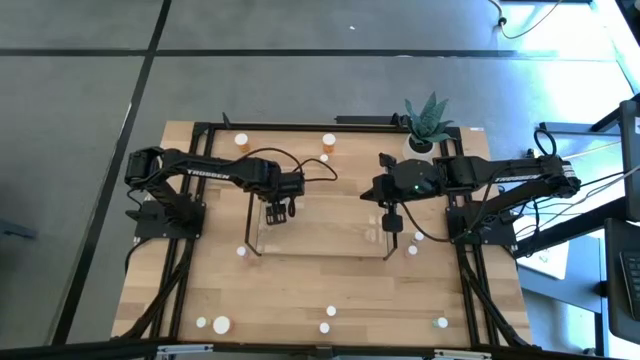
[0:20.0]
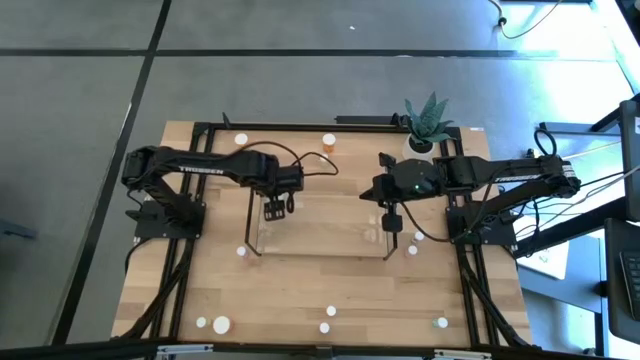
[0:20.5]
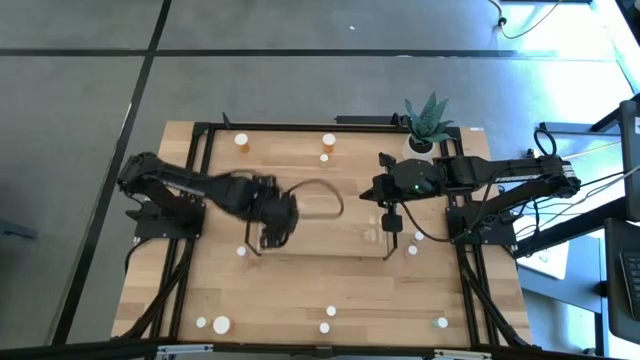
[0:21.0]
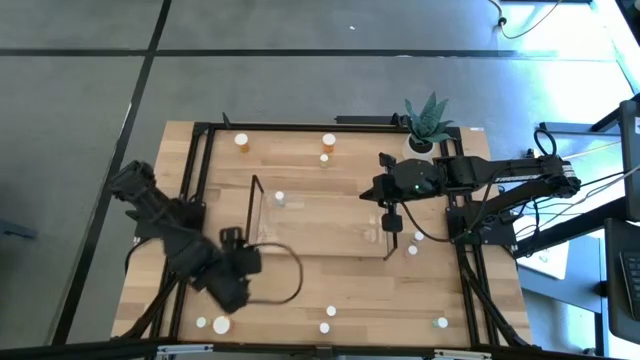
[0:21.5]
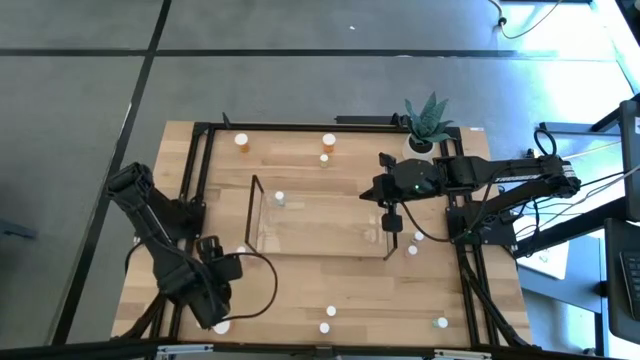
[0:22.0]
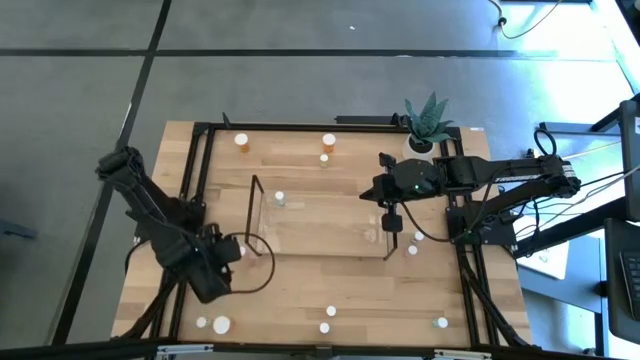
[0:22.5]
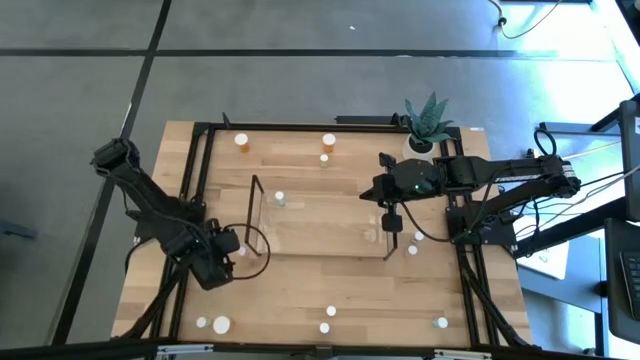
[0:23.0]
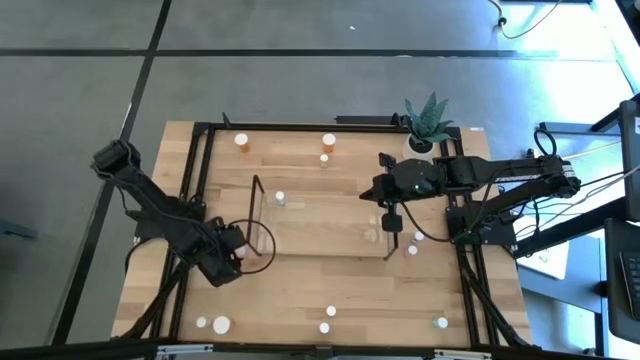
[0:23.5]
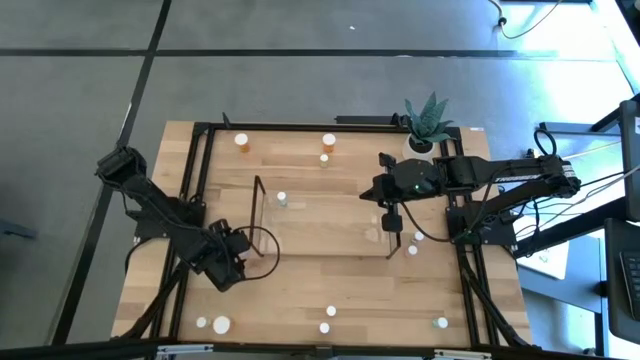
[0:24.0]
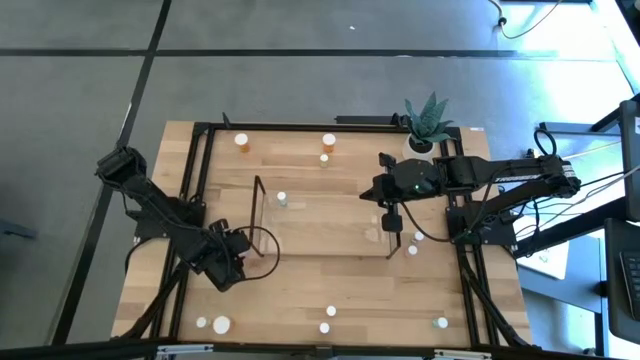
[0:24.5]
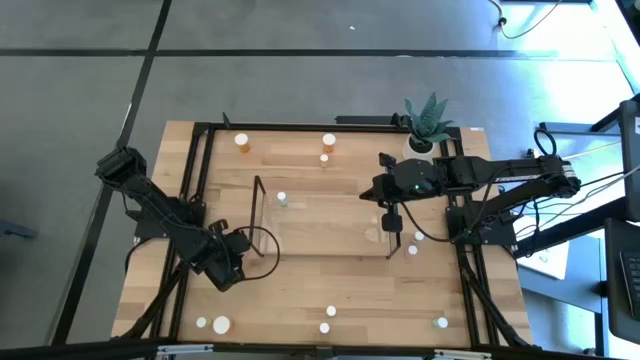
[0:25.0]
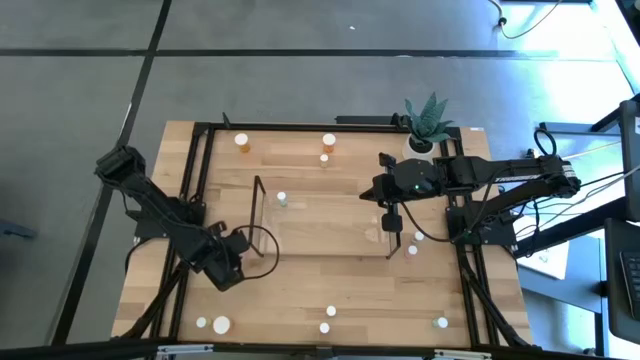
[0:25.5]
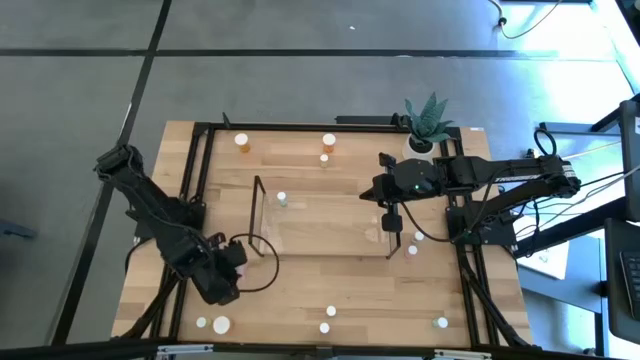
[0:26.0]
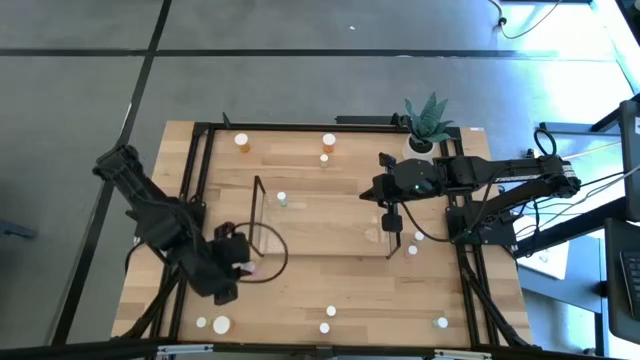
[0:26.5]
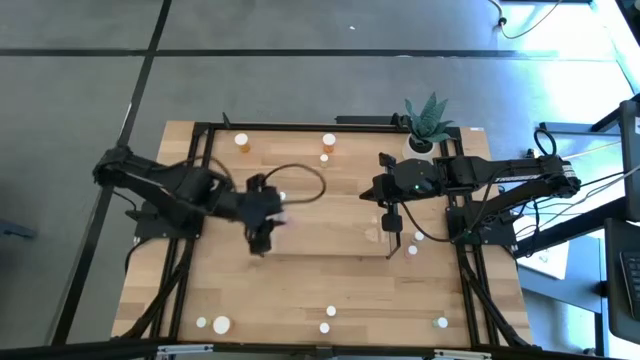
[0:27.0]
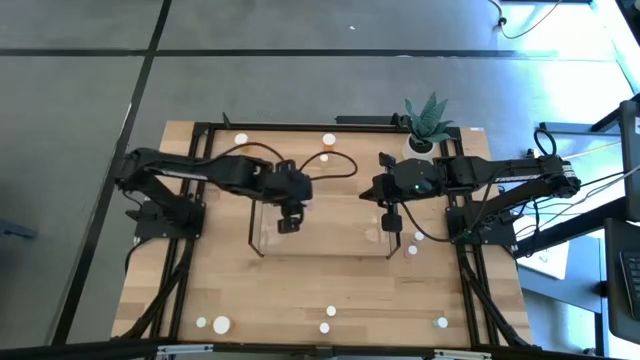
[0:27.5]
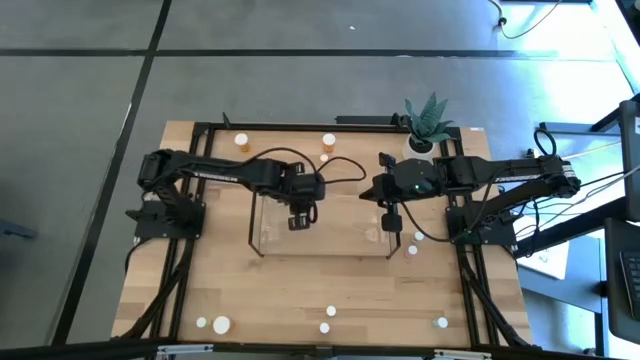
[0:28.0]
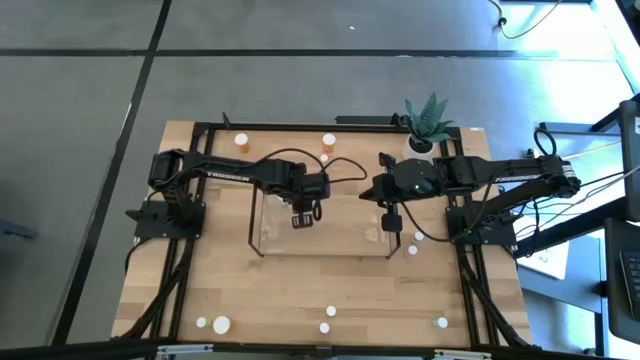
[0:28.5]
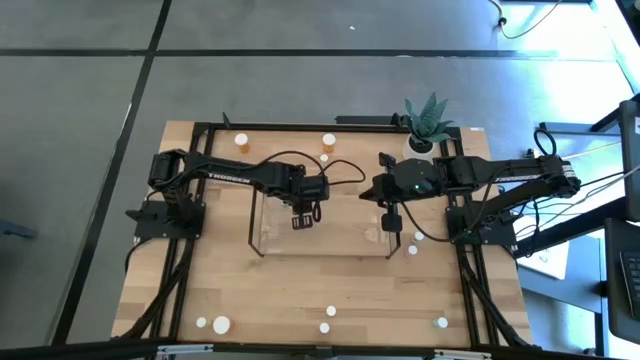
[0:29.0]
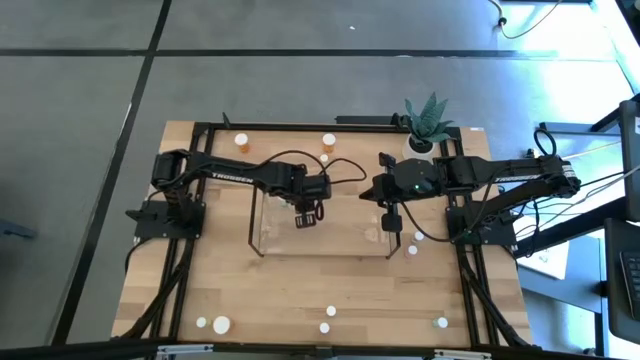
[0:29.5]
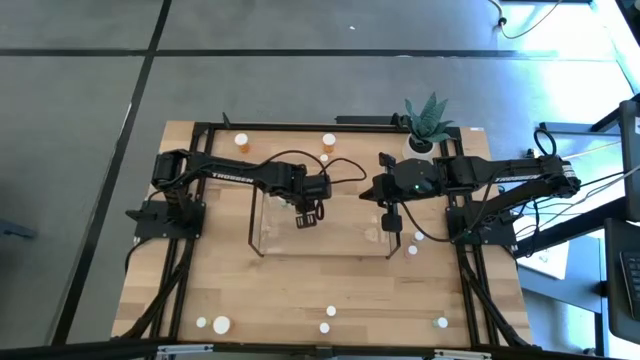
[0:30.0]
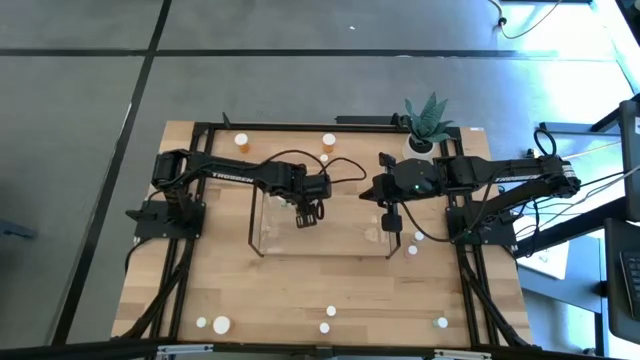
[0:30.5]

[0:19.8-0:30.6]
Task: Pick and place medicine bottles onto shelf by color
Put the top left pink pill bottle on the shelf

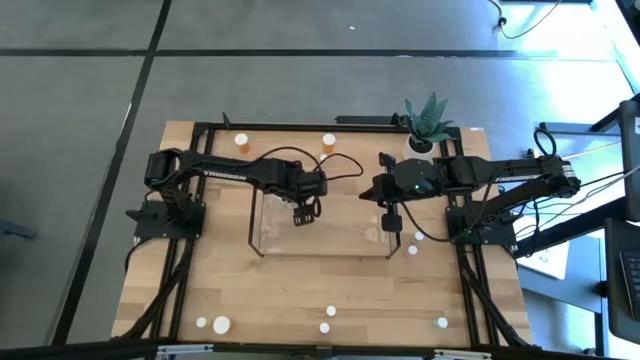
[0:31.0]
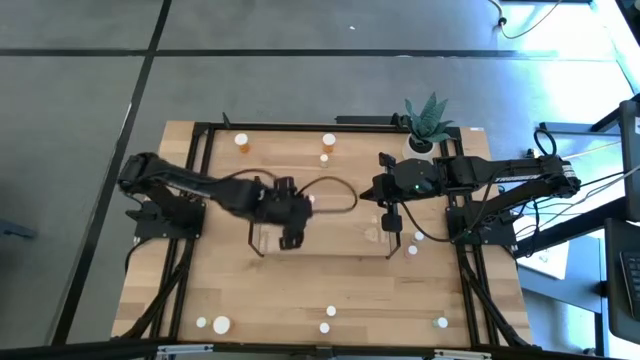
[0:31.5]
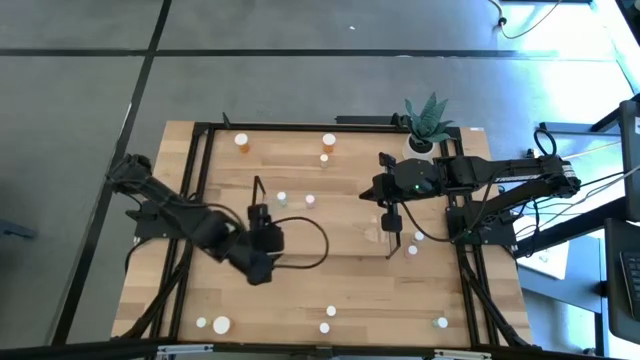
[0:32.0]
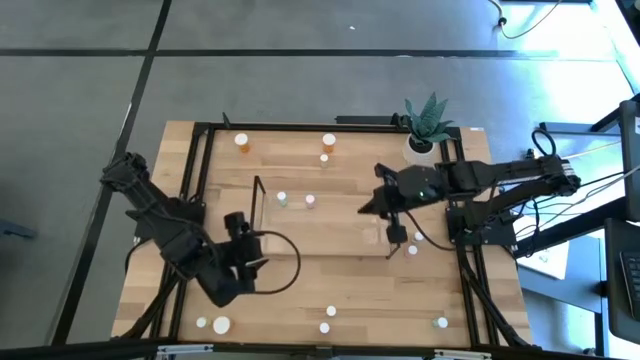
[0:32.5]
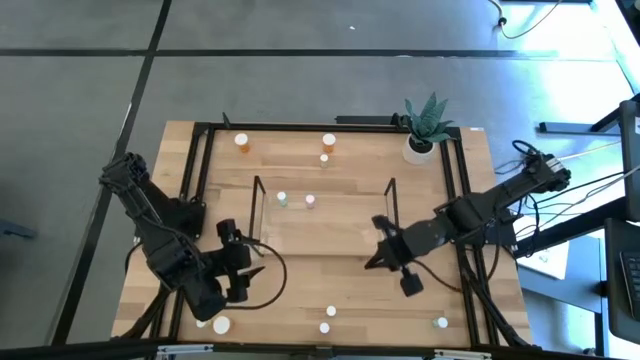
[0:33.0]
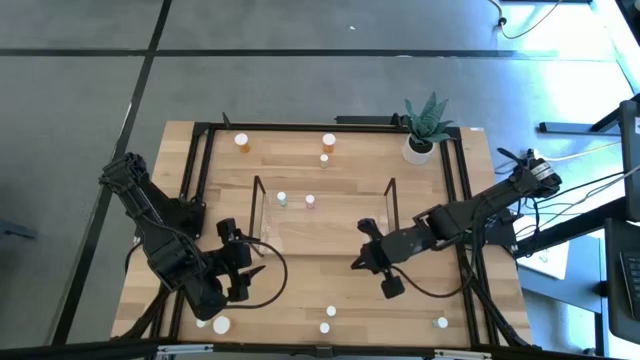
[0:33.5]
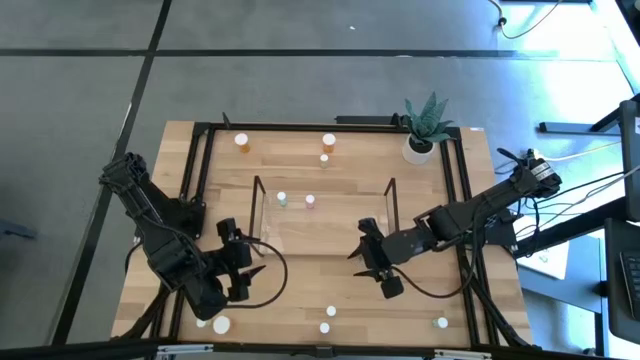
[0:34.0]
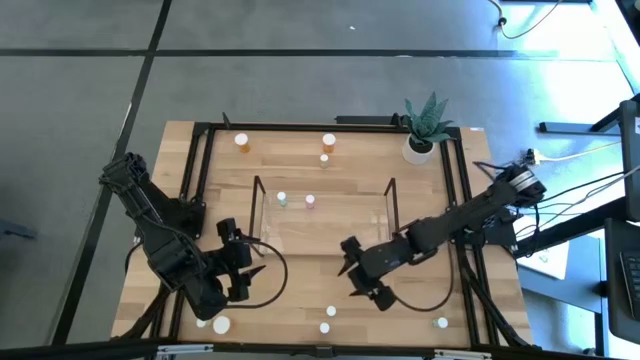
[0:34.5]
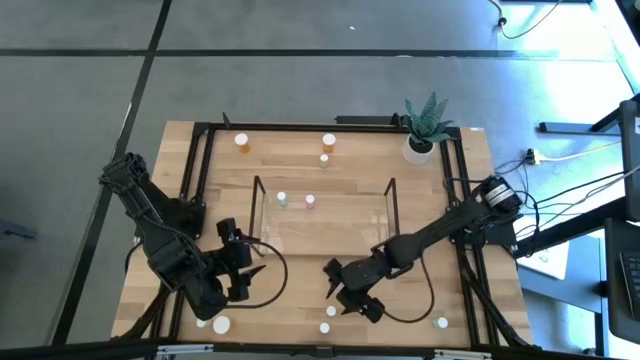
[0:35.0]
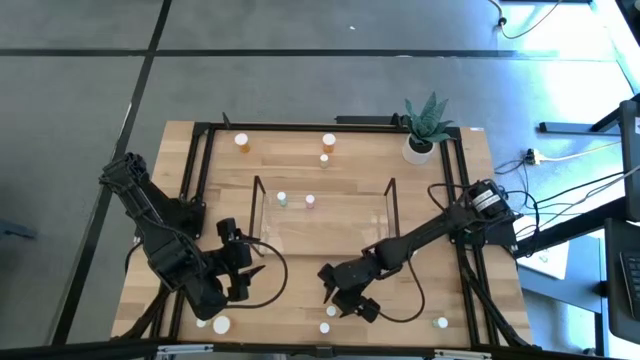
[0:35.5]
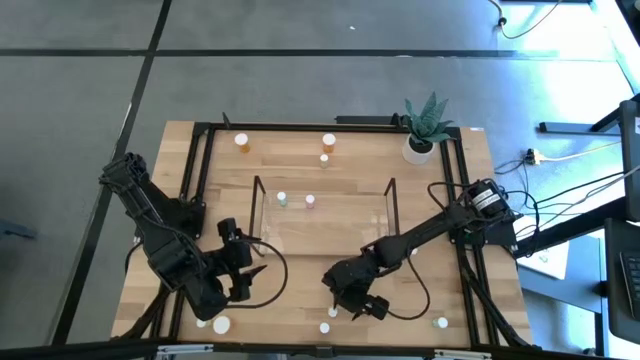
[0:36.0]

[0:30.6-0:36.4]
Put the bottom right yellow pill bottle on the shelf

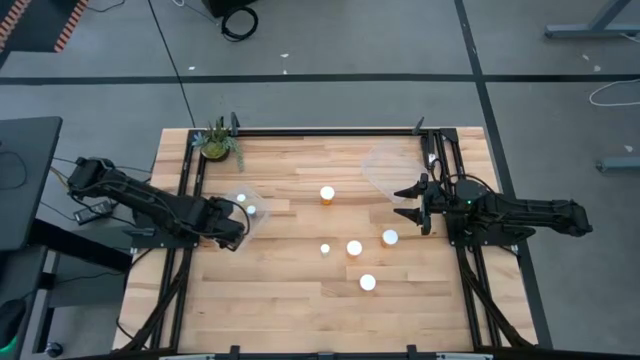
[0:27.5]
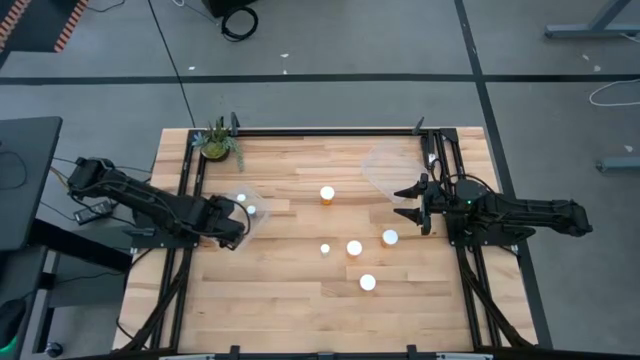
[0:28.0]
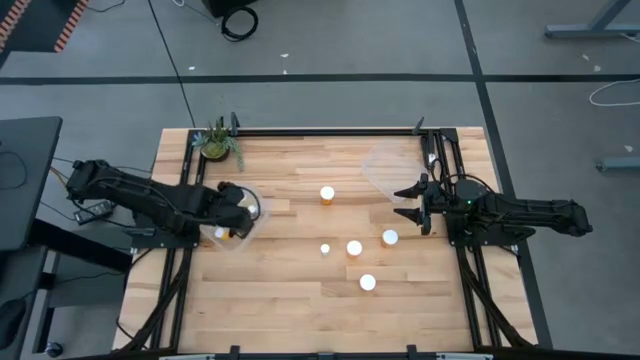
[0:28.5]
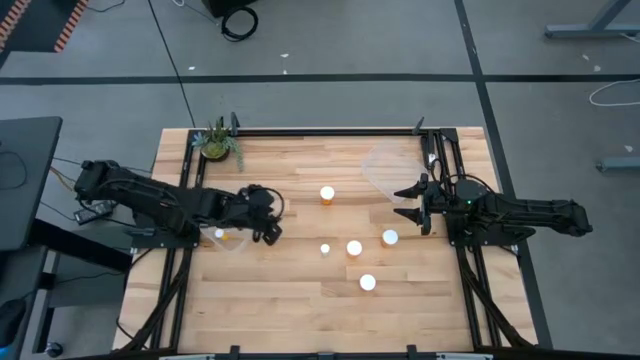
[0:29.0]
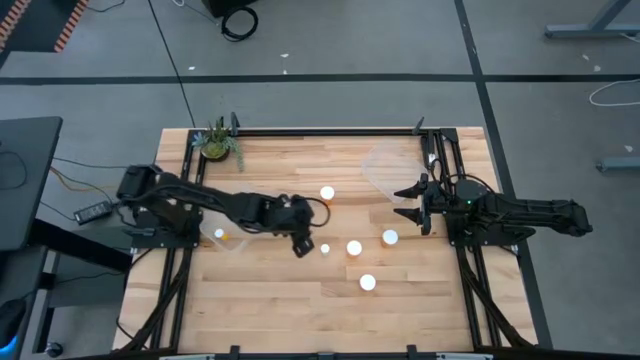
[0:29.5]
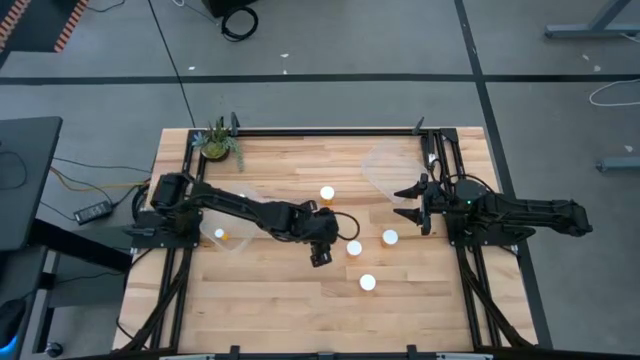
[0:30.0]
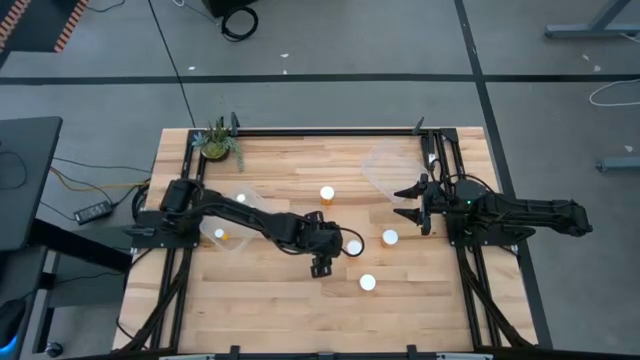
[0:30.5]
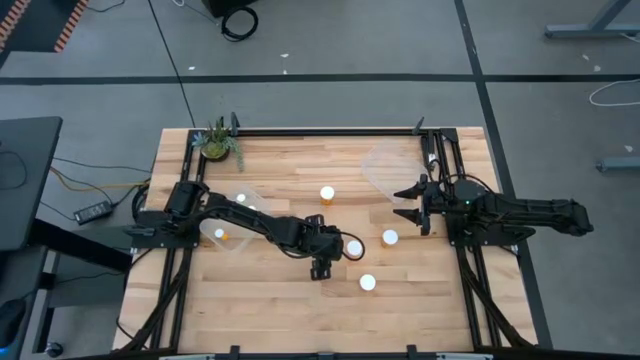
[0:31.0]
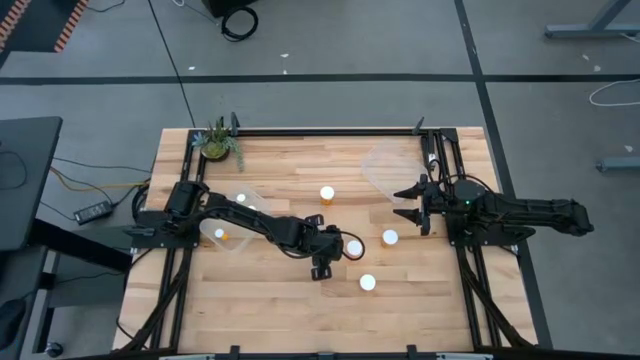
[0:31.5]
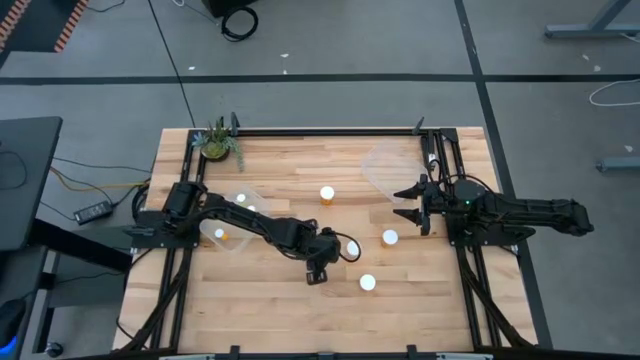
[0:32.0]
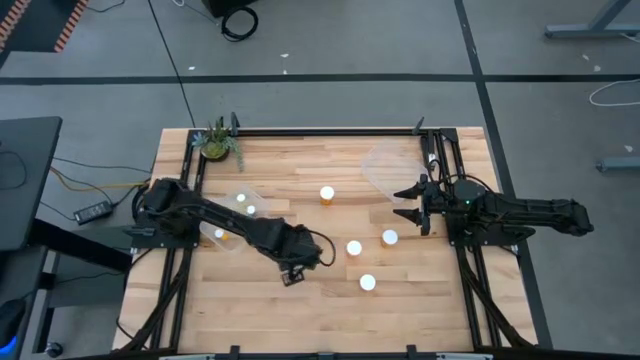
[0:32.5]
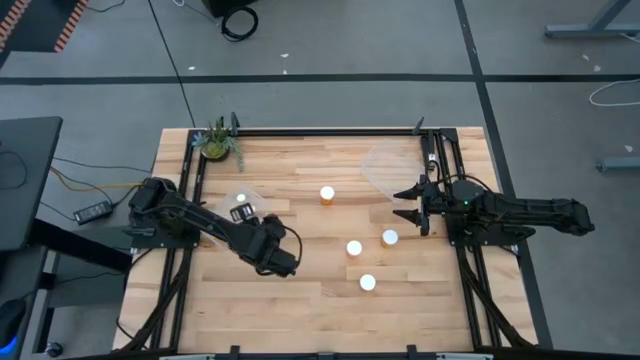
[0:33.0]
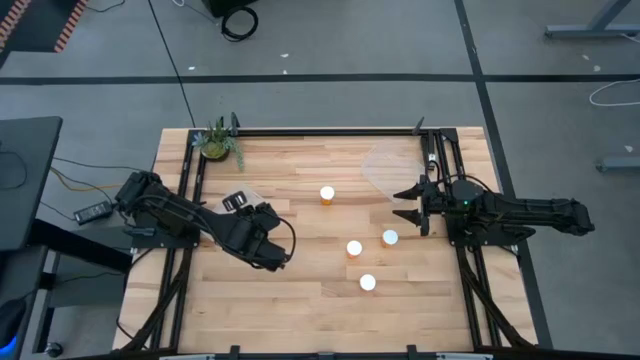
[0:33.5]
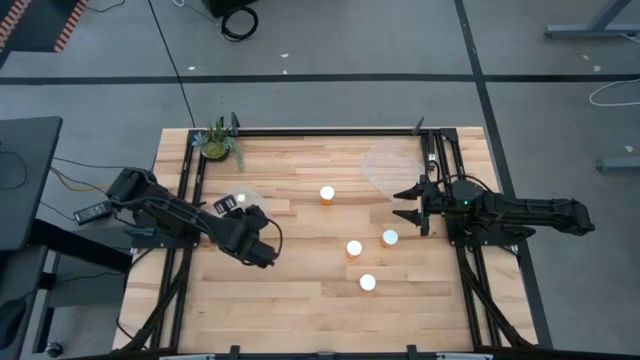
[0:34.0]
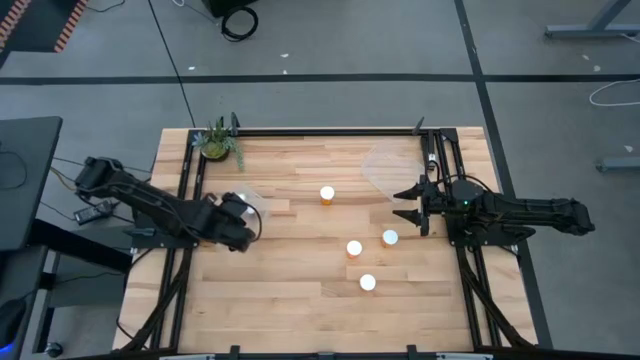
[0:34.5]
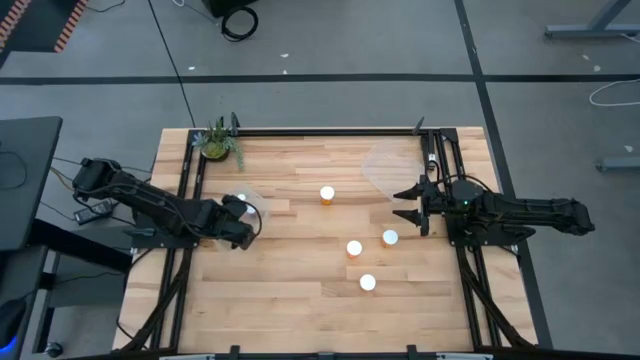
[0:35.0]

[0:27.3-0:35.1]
Task: Pick and place medicine bottles into bin by pill shape (circle, oval)
Put the small yellow pill bottle into the left transparent bin
